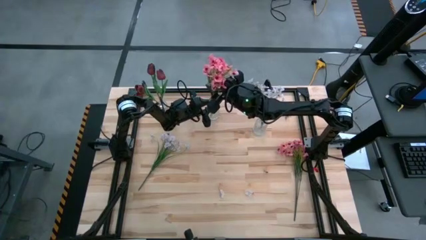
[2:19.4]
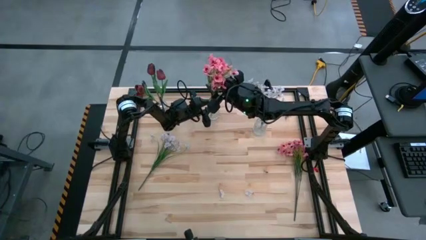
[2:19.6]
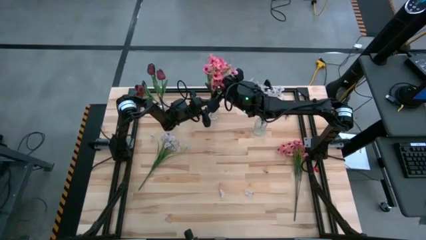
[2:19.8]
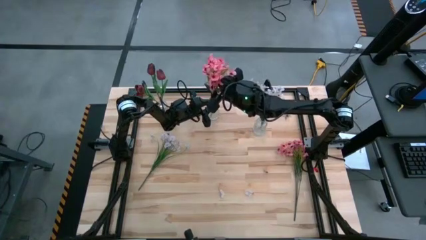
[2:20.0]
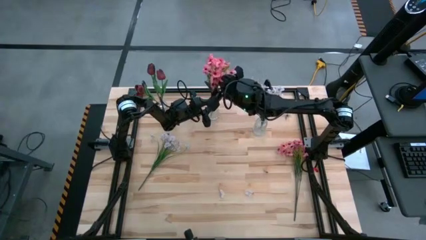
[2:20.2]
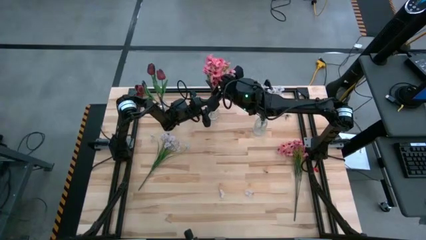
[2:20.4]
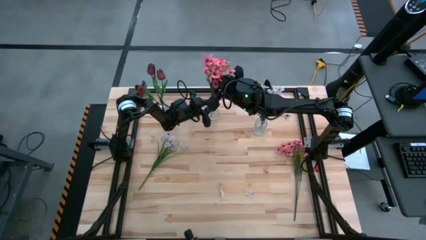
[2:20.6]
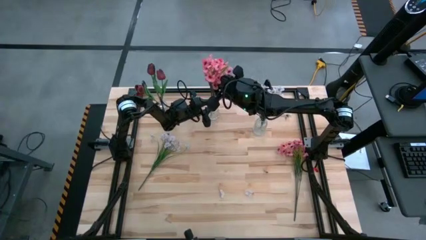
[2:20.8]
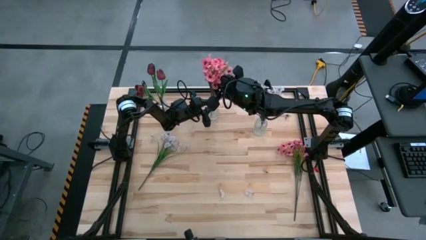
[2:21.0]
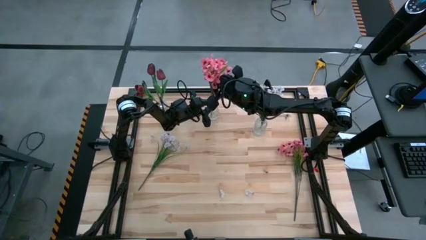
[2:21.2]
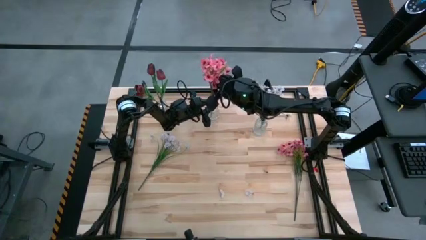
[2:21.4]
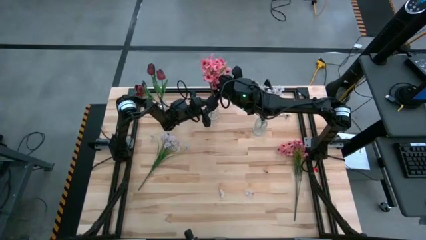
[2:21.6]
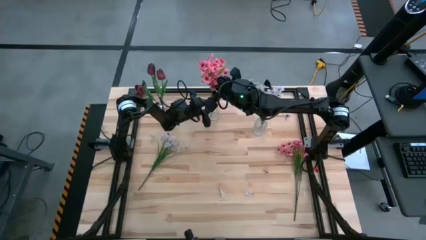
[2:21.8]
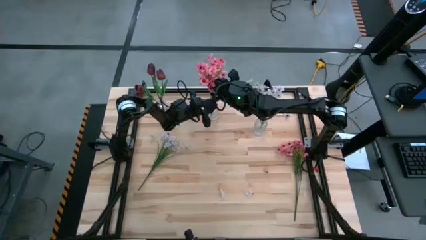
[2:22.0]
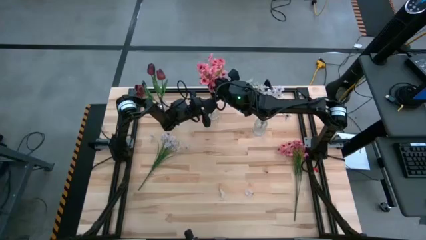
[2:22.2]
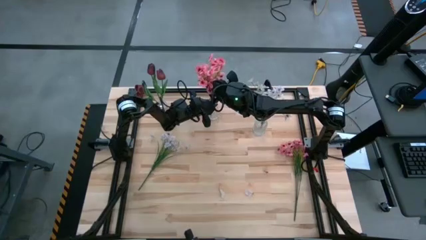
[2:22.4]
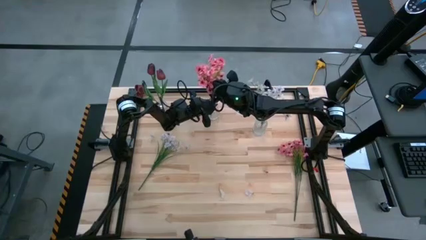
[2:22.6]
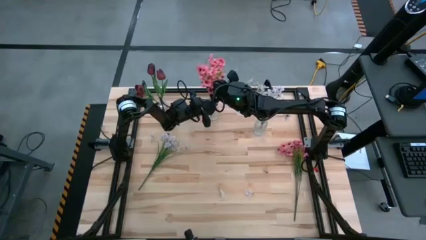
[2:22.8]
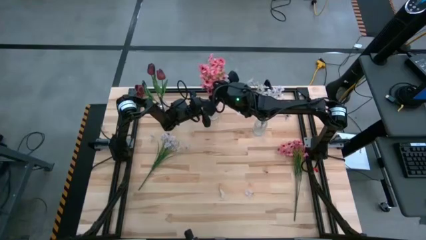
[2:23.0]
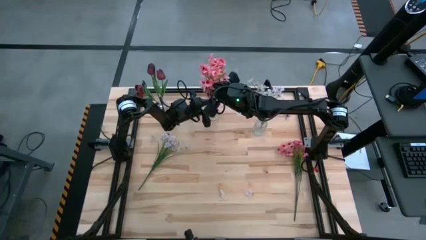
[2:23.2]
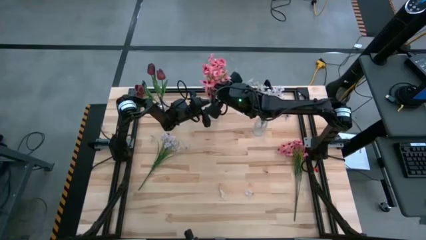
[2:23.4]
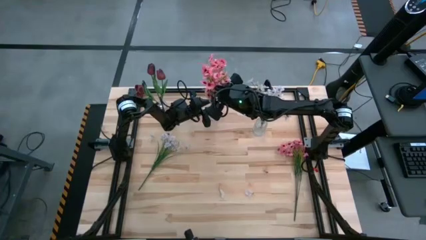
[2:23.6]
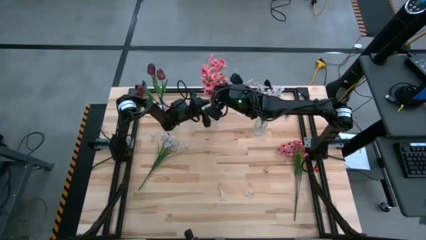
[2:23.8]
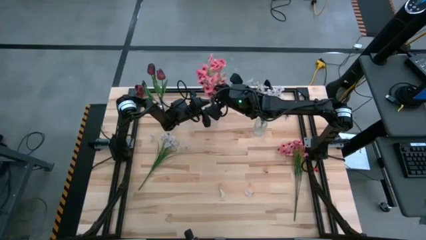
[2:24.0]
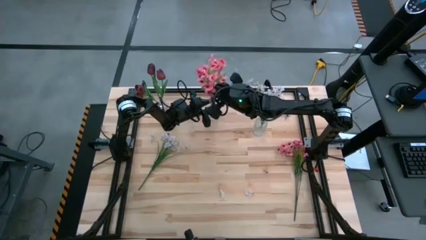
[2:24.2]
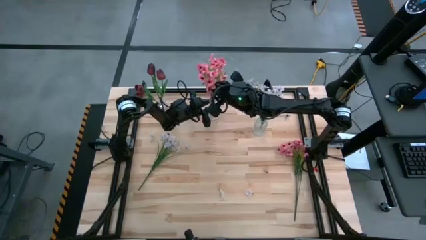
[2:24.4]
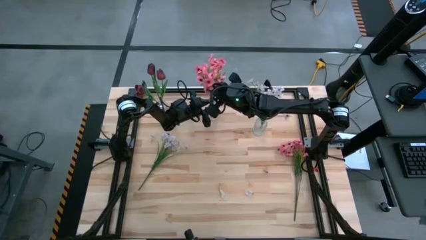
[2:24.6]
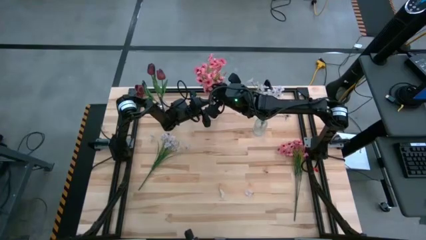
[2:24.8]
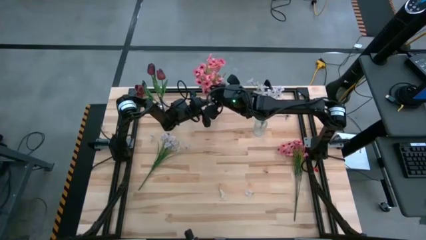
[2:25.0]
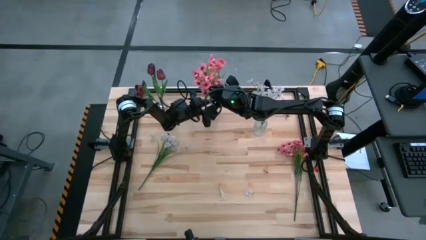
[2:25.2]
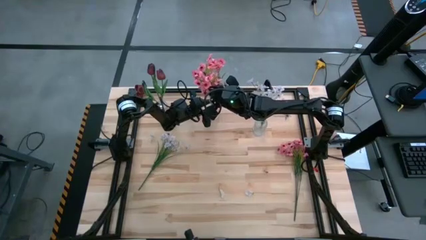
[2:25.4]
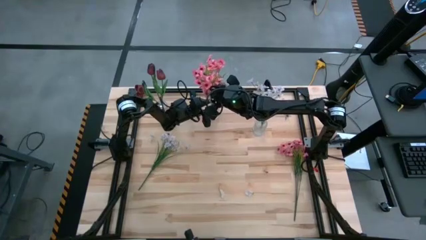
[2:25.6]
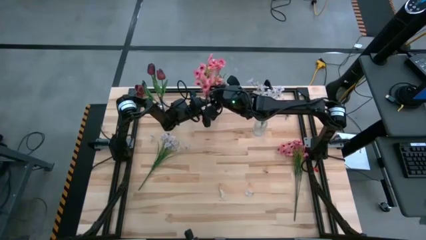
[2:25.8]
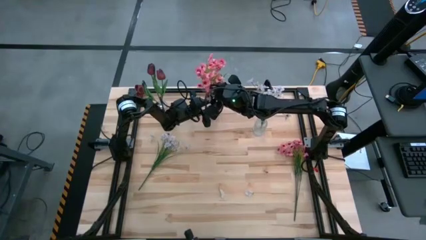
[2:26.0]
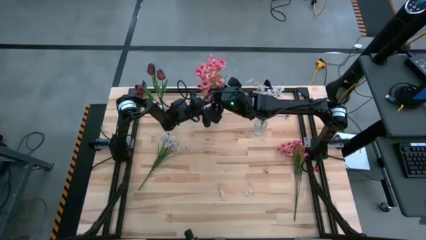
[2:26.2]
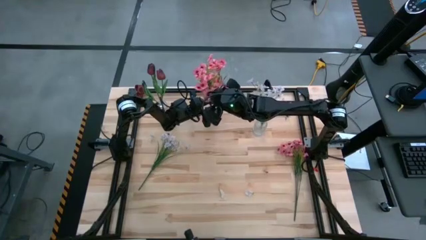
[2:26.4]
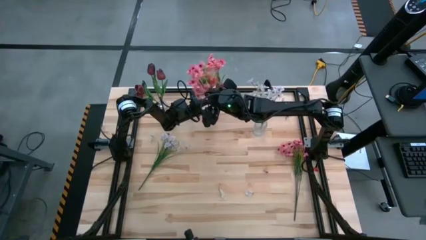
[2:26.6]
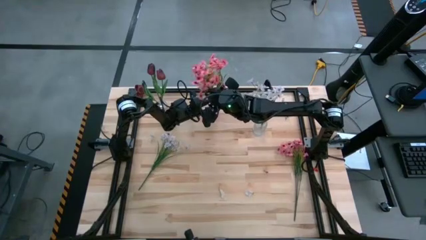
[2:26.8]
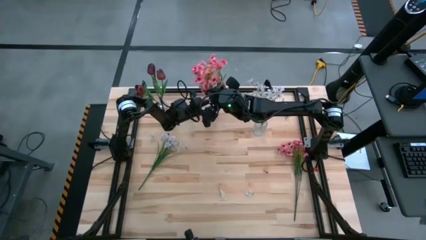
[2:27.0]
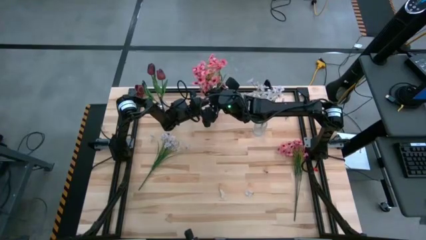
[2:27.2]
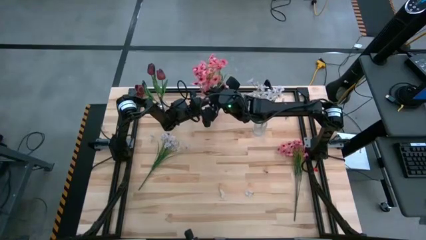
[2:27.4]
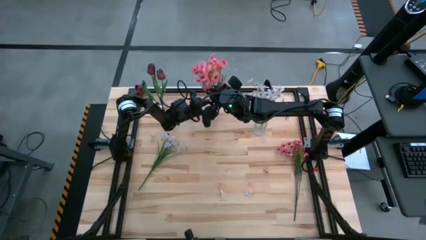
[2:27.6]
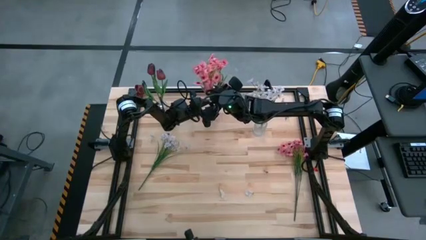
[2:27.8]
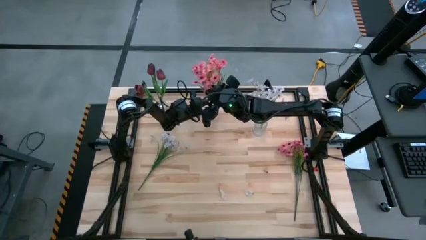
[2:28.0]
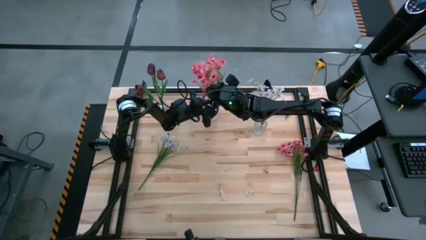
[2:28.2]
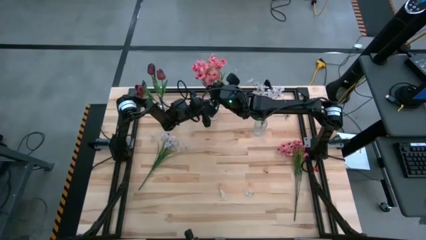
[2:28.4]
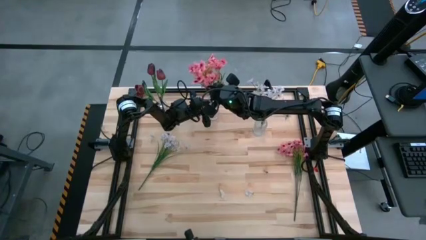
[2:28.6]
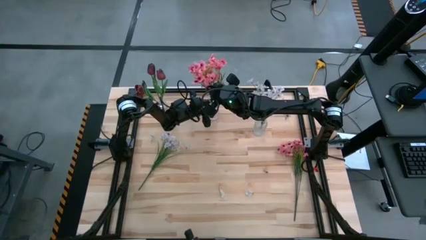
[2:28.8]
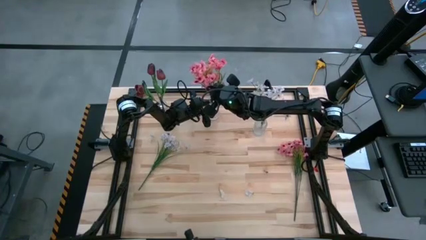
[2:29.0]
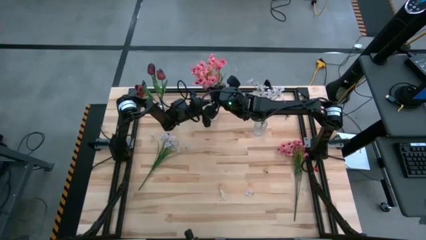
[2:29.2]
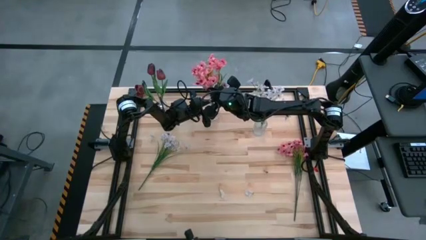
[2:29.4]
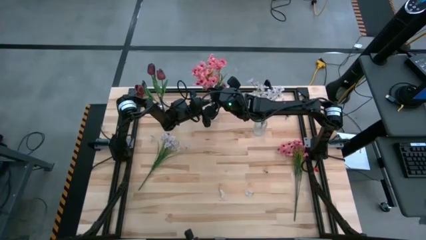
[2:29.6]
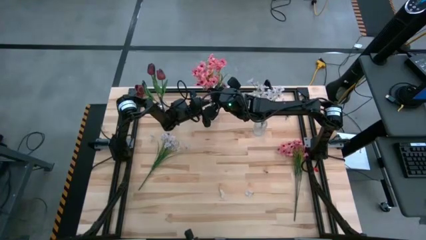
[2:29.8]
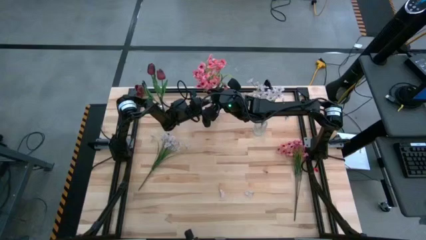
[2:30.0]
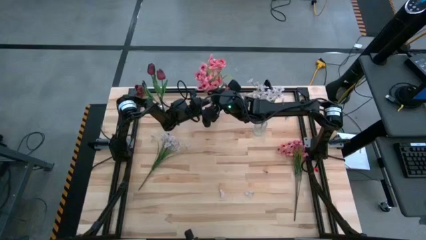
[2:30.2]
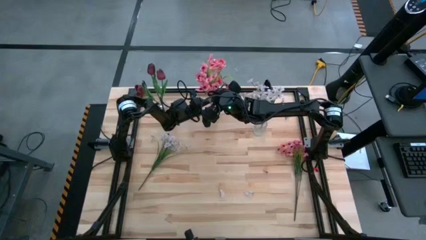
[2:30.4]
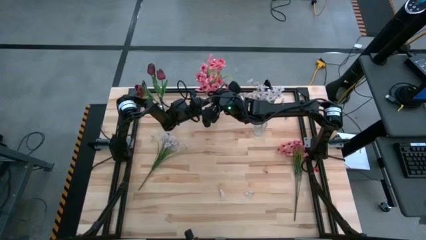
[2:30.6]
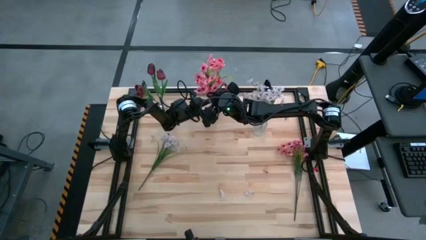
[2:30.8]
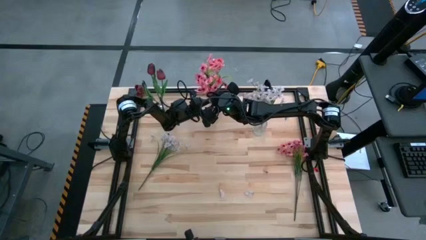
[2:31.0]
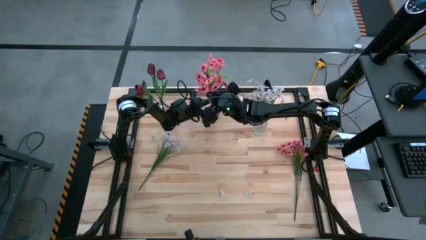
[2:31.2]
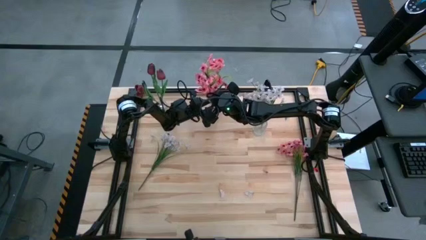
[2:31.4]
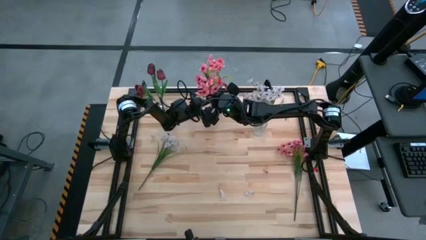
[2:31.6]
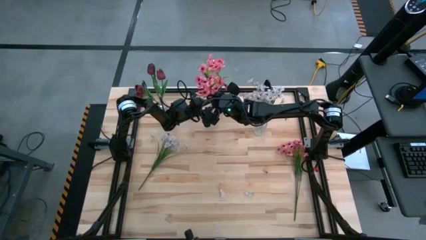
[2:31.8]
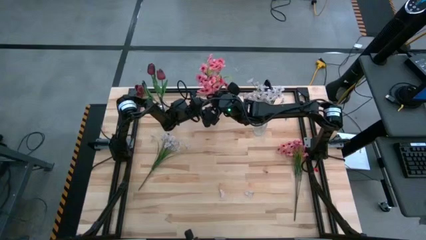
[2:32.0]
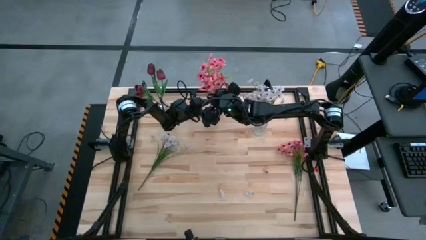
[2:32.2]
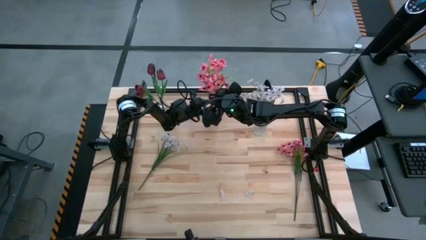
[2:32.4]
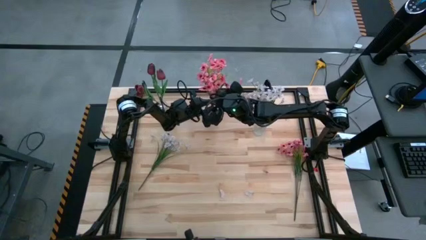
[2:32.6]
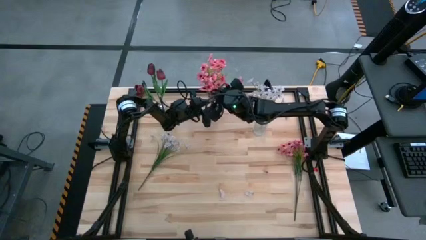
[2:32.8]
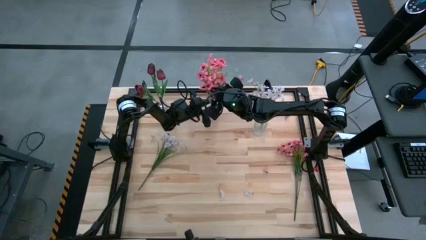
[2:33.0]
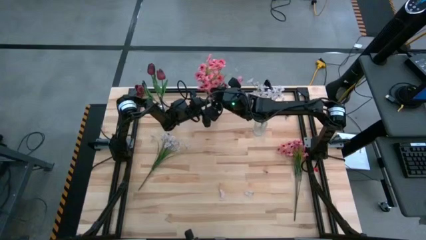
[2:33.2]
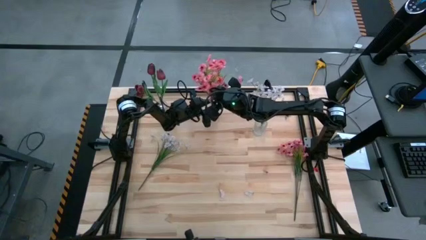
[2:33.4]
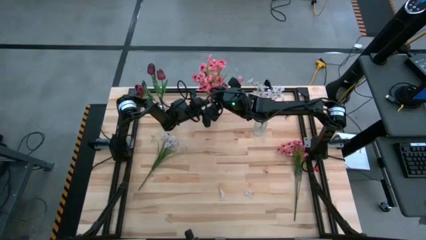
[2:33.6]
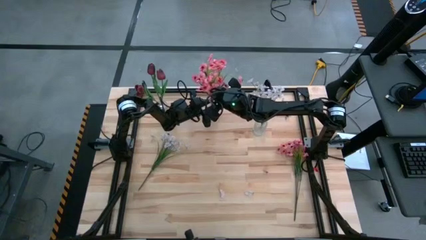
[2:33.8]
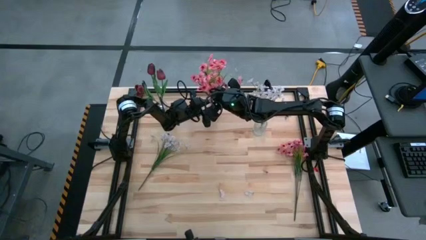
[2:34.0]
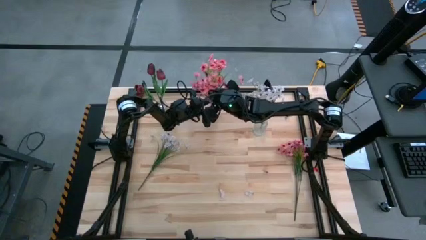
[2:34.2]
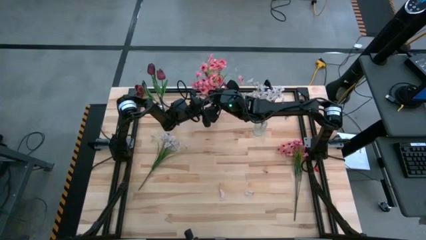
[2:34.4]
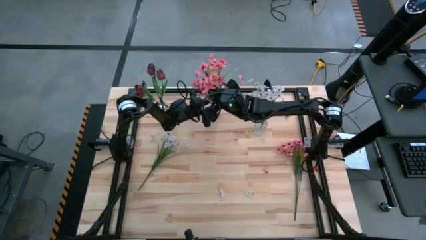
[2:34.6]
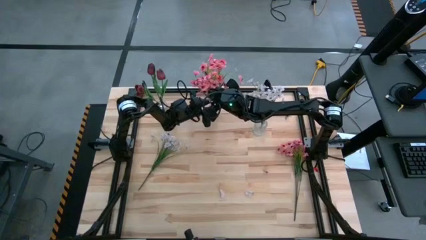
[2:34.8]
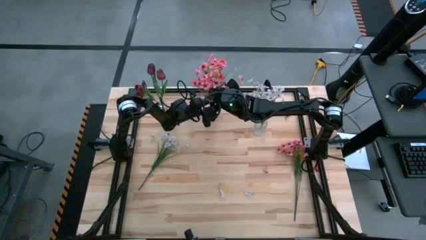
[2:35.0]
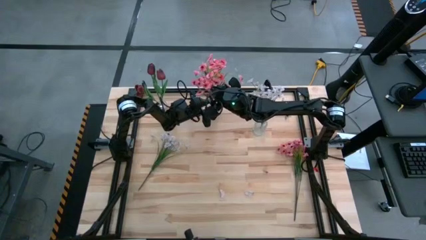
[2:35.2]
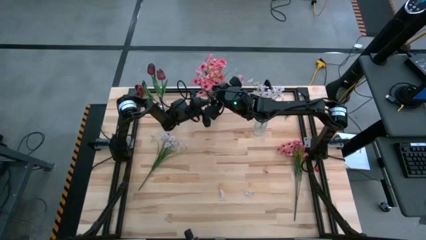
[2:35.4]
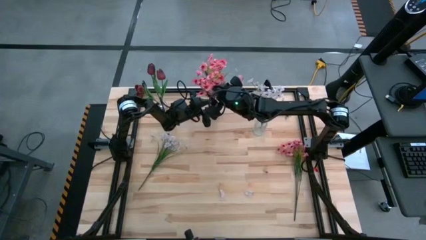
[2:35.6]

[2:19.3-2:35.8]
Task: Sort flowers into vase by color
Put the left pink flowers into the middle transparent vase
